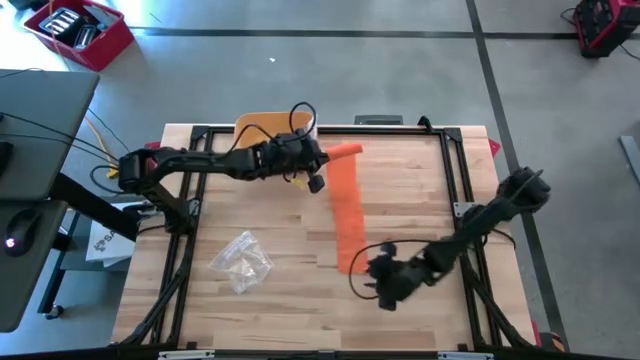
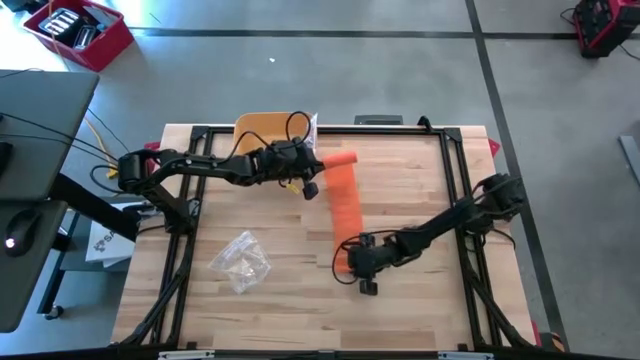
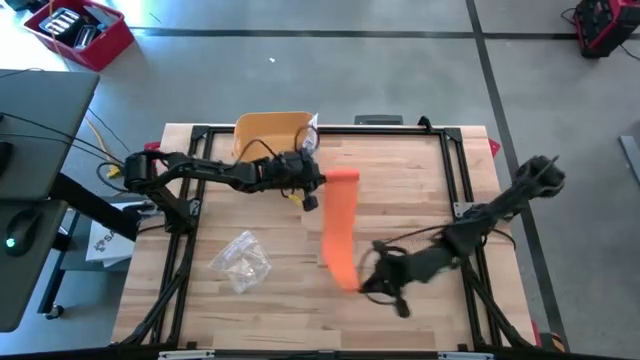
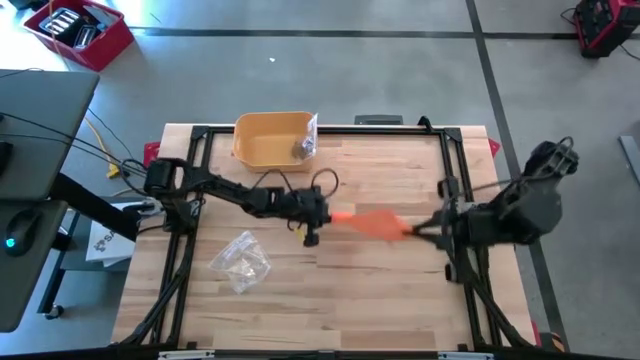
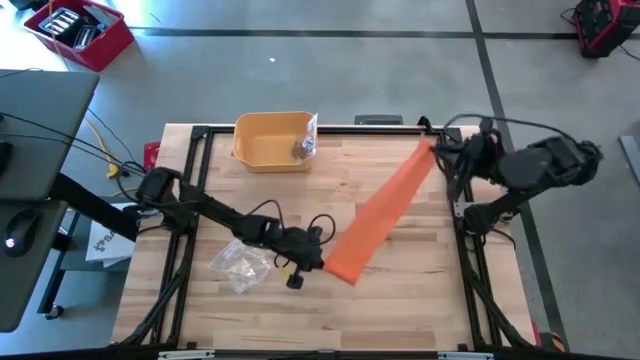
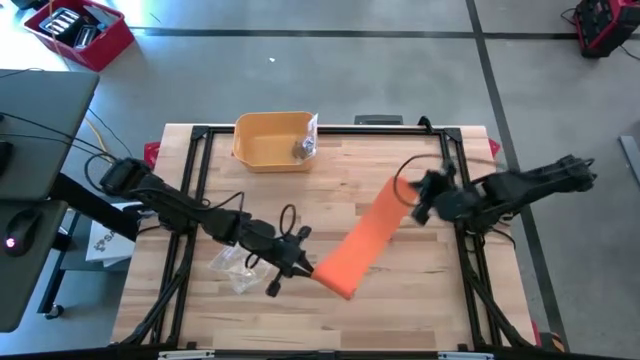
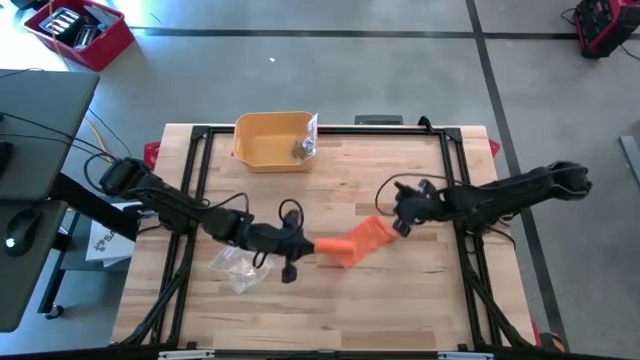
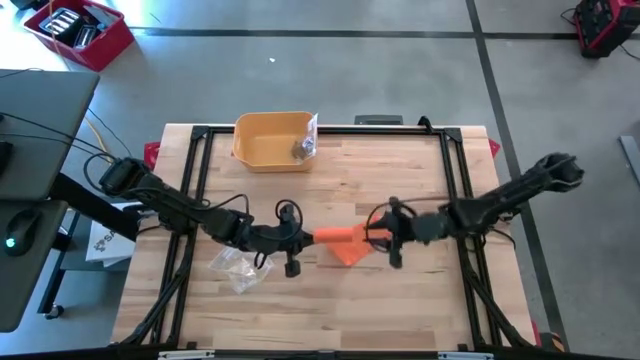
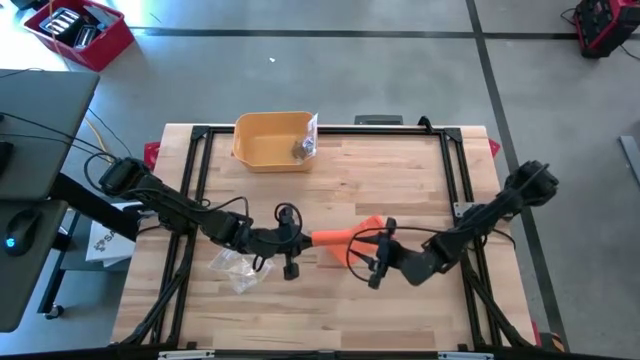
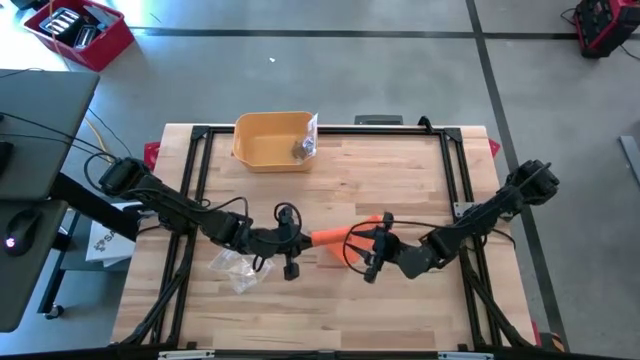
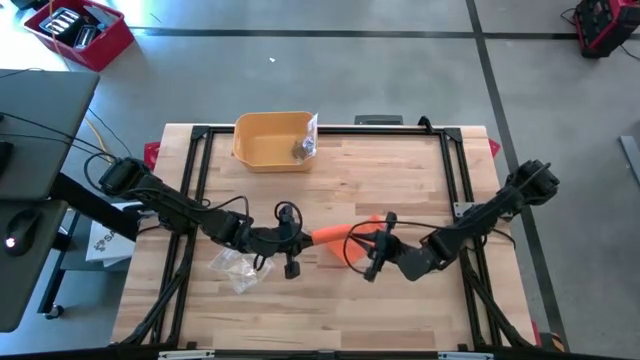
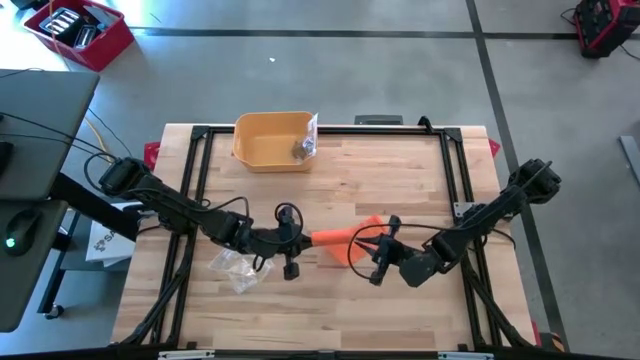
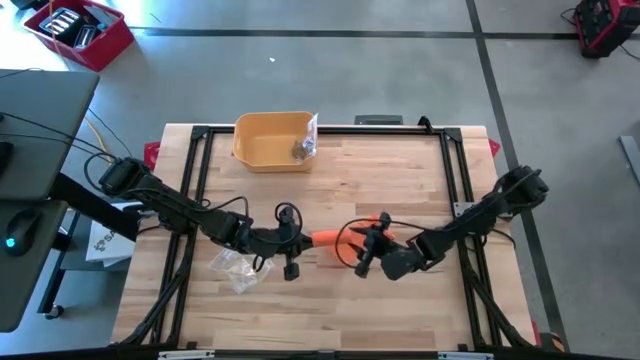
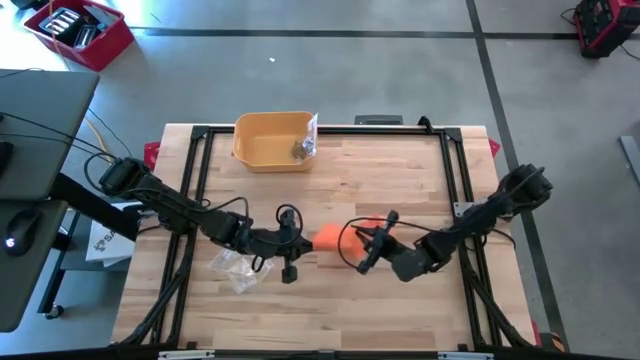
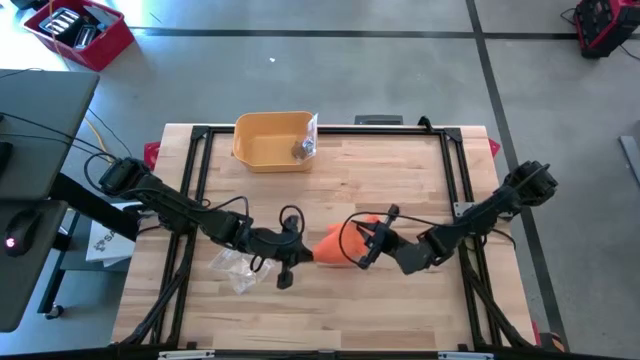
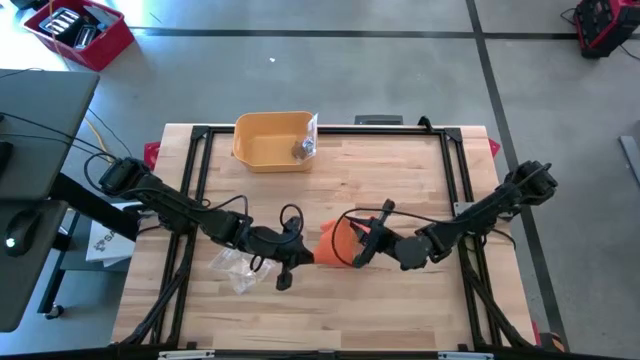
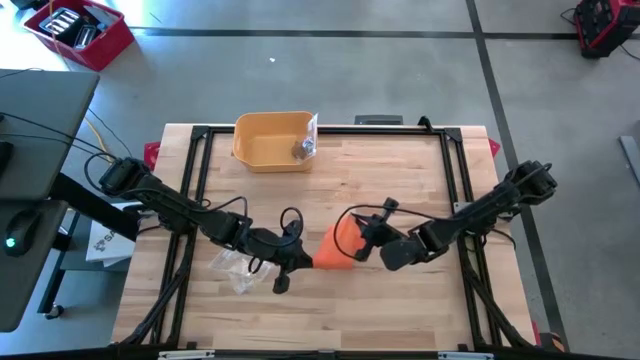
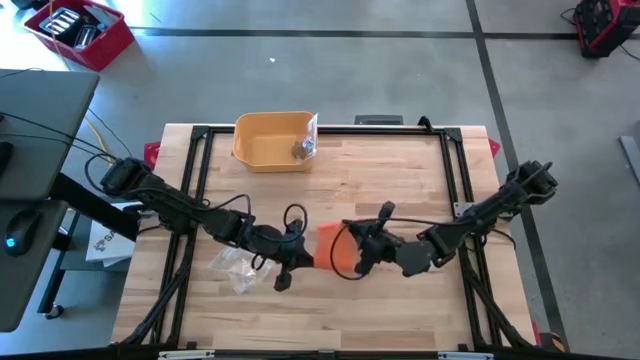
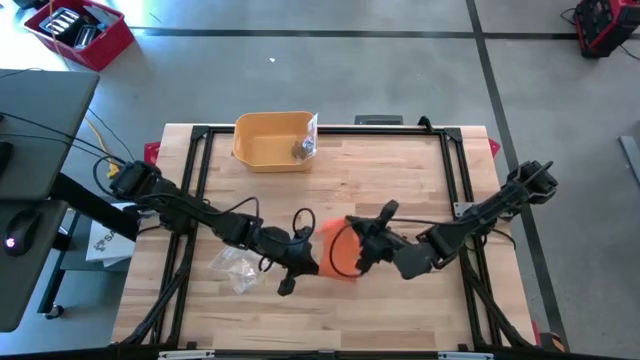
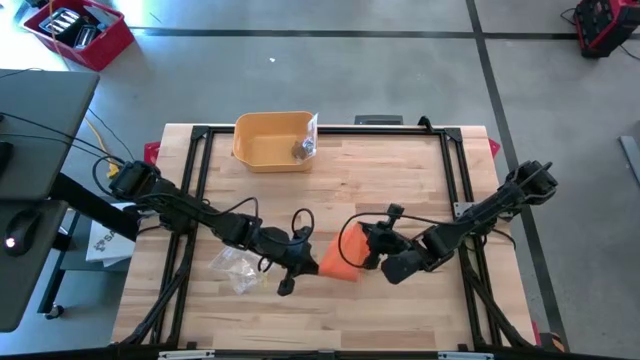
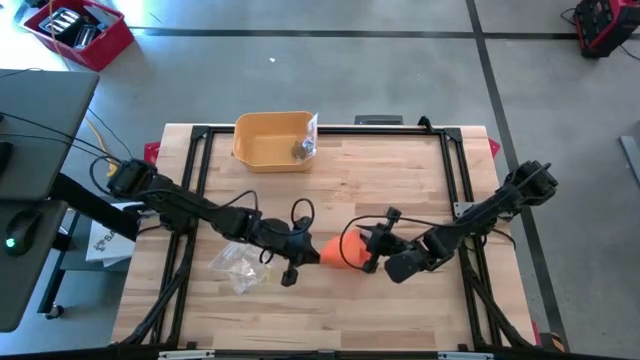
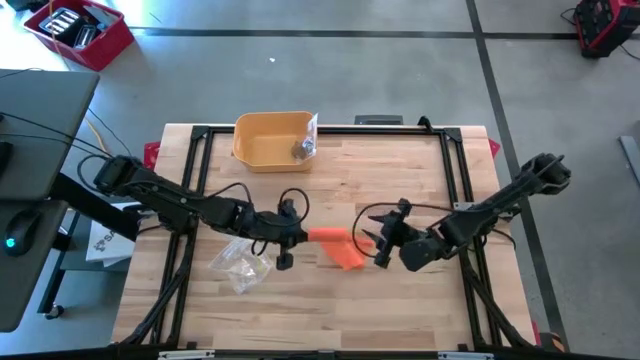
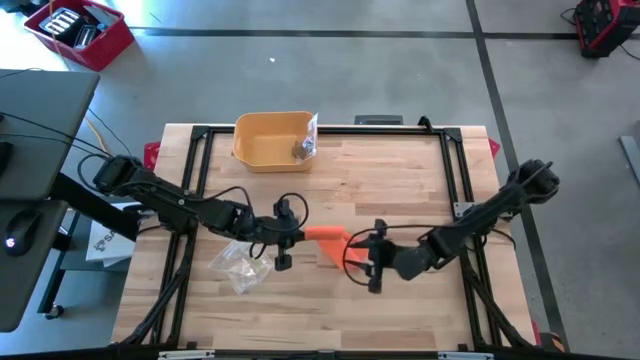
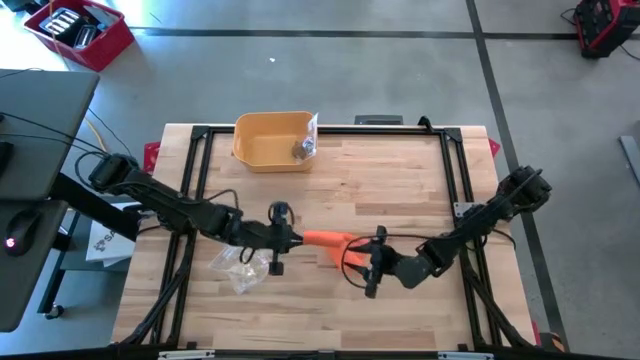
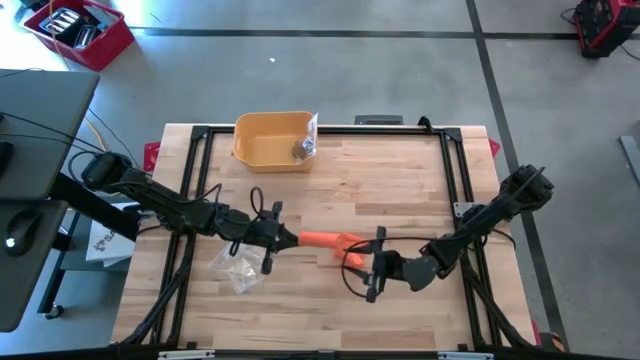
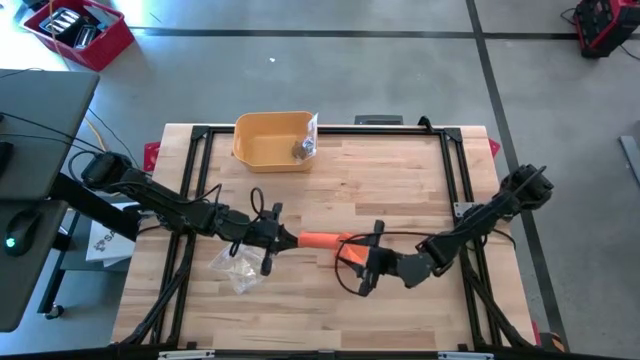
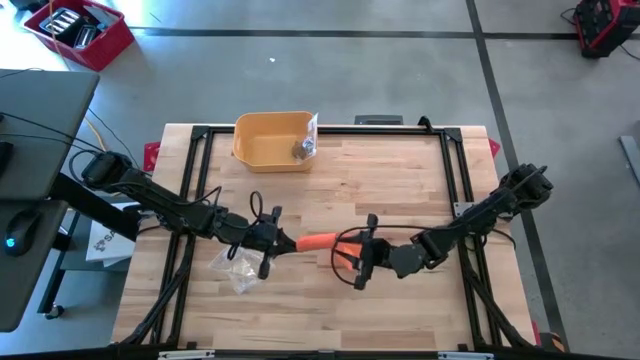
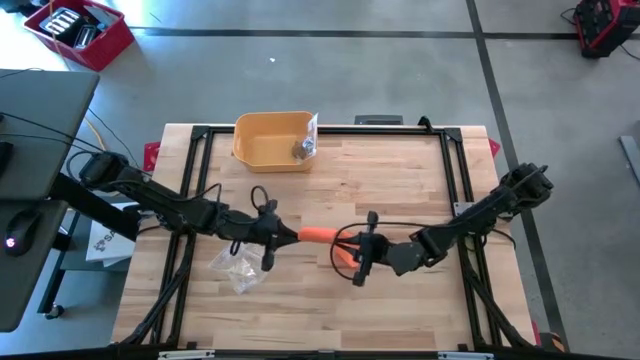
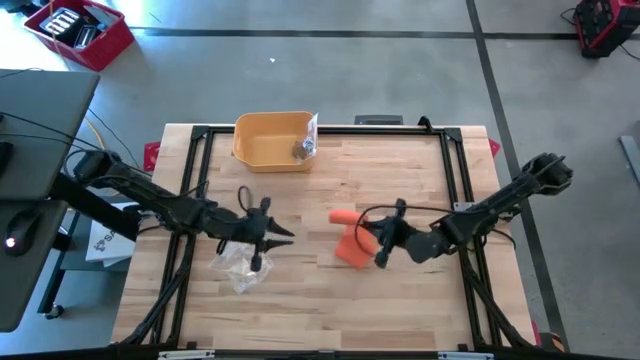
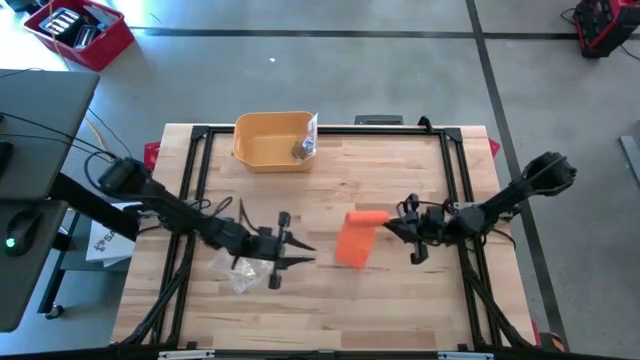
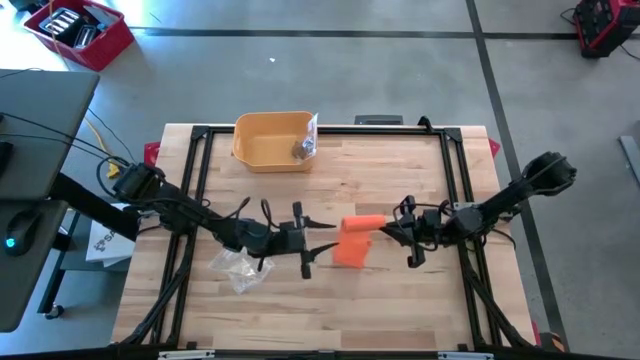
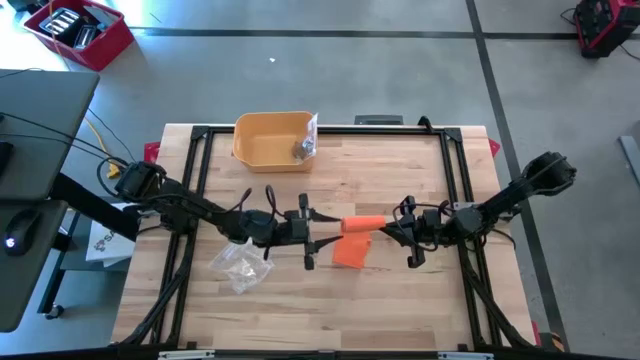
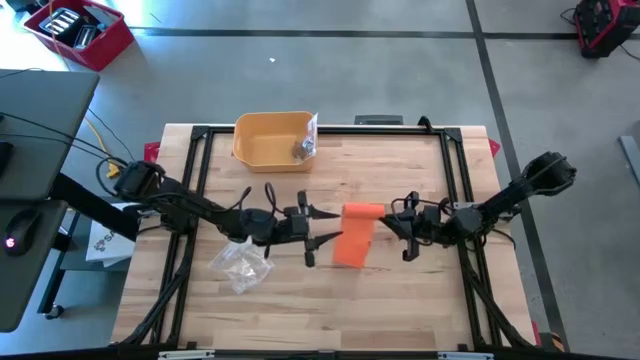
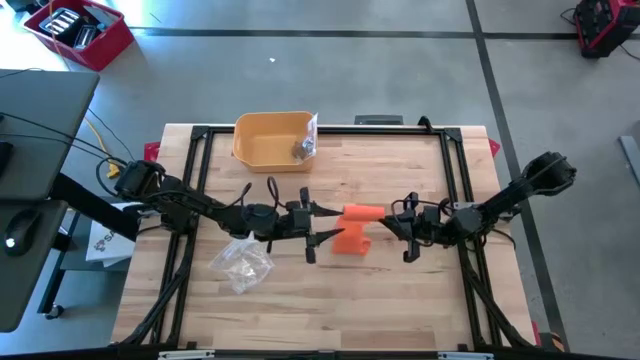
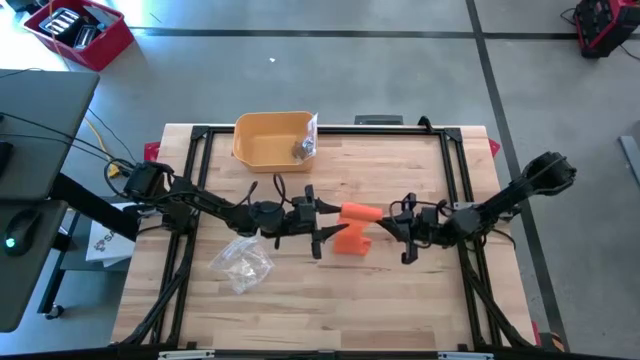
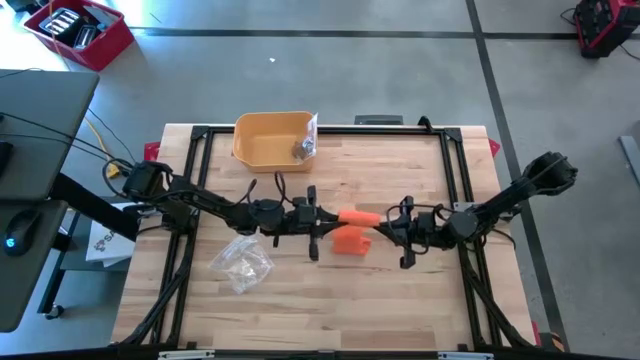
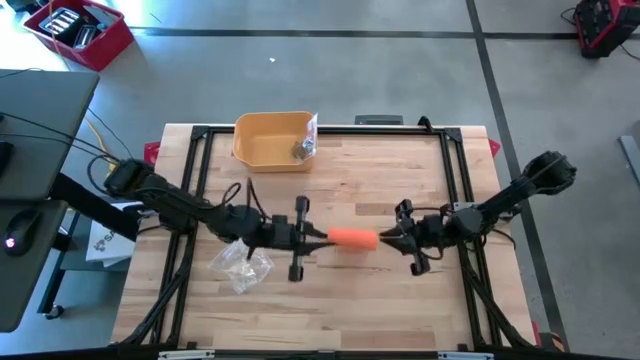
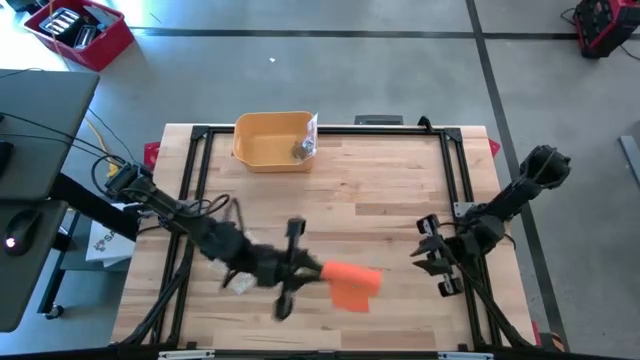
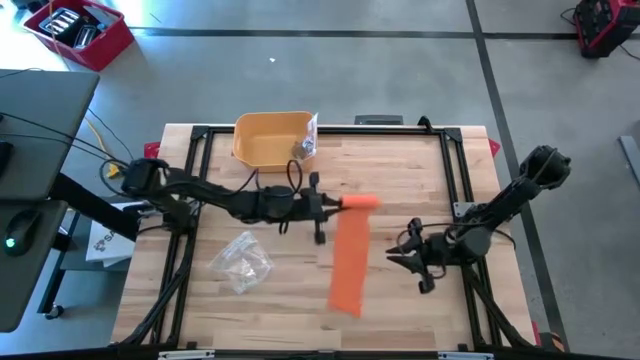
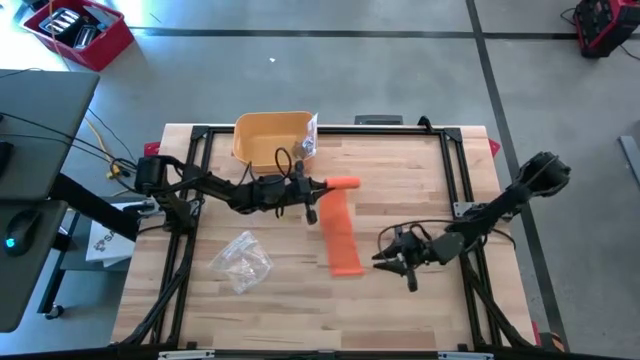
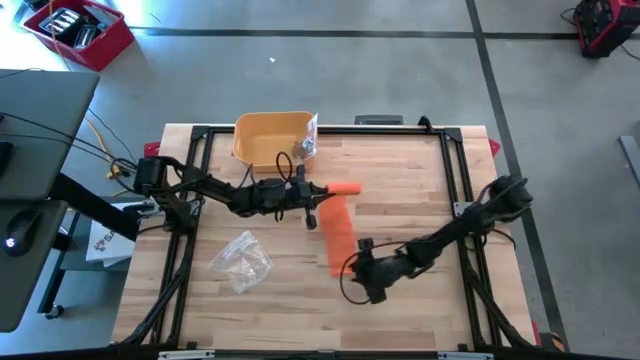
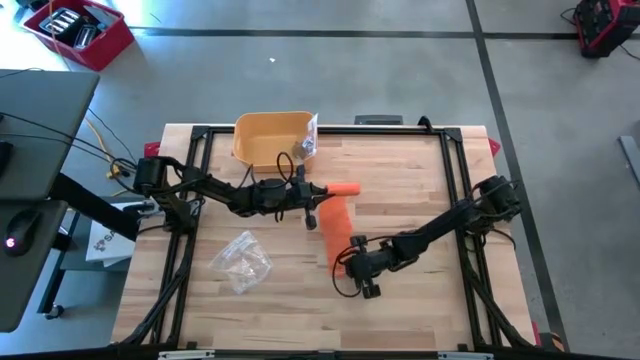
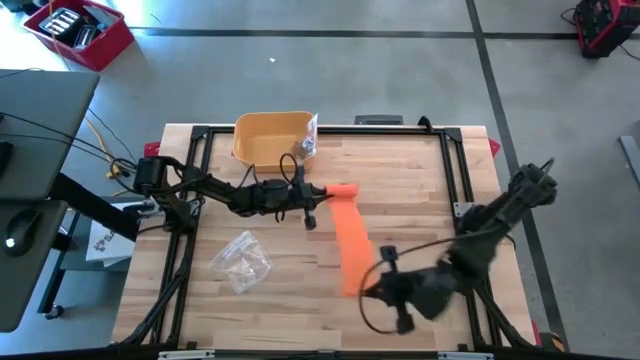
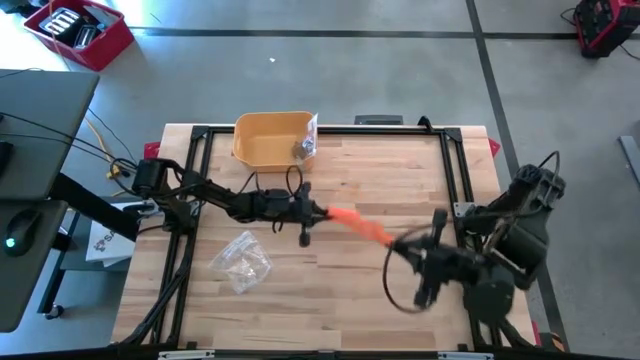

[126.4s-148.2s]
Task: Roll bandage
Roll the orange bandage
